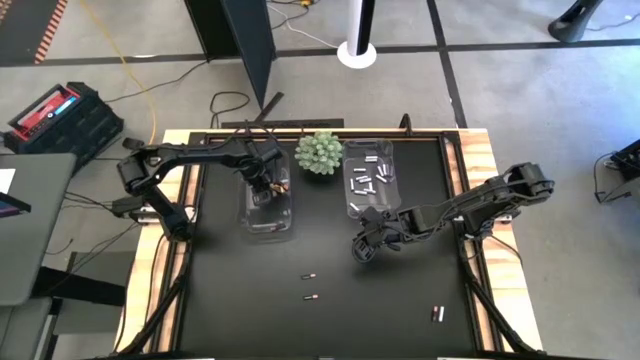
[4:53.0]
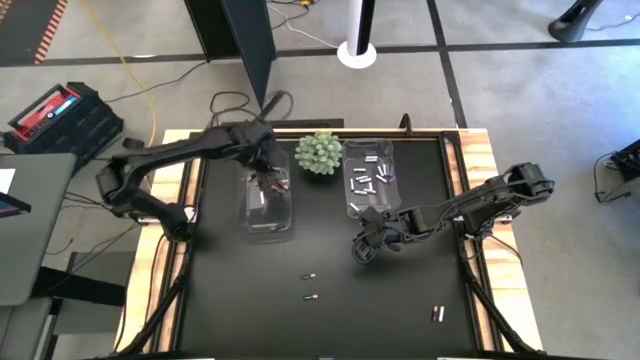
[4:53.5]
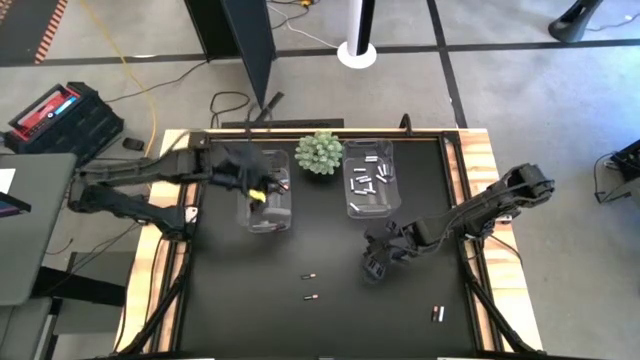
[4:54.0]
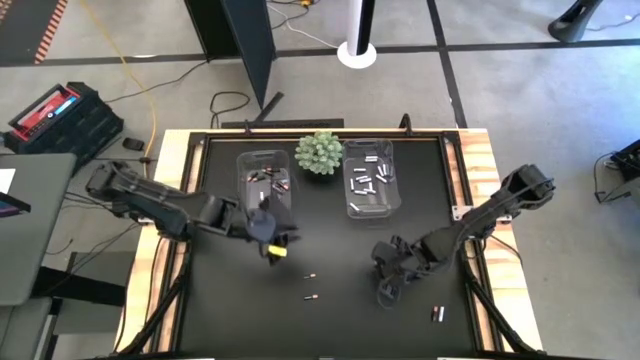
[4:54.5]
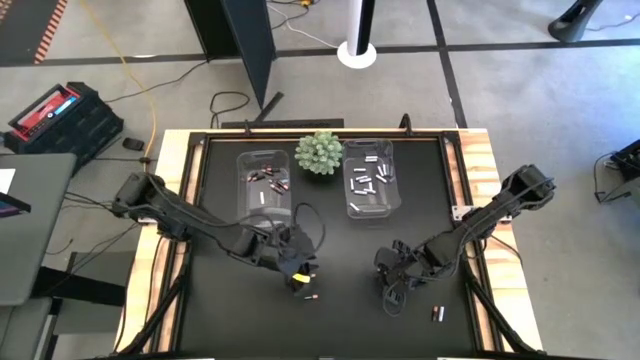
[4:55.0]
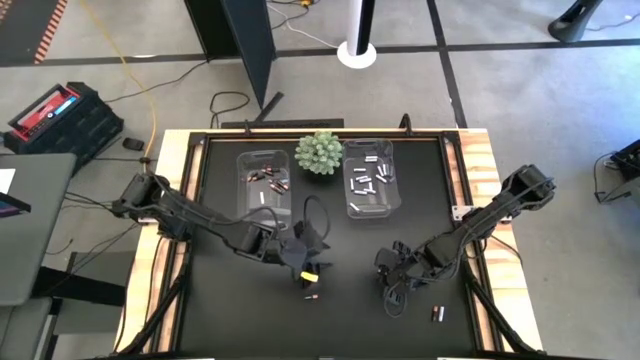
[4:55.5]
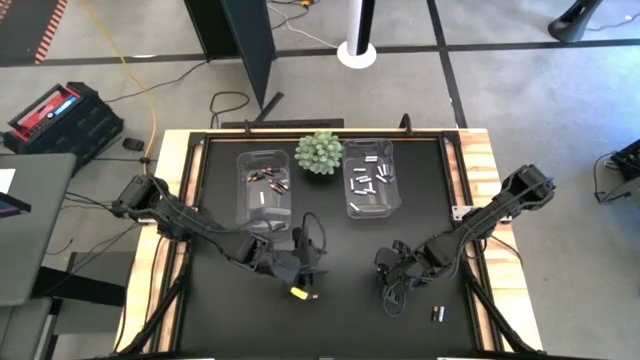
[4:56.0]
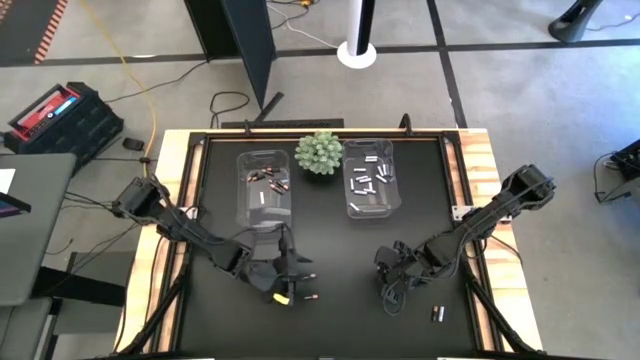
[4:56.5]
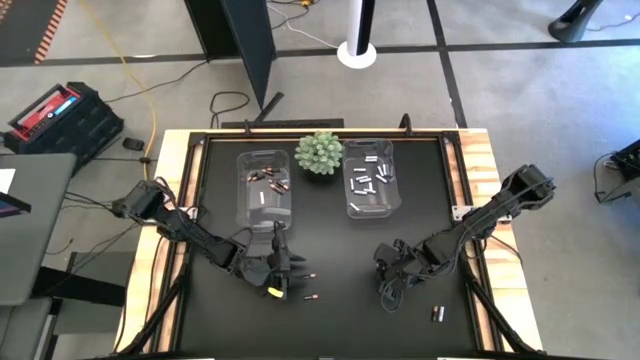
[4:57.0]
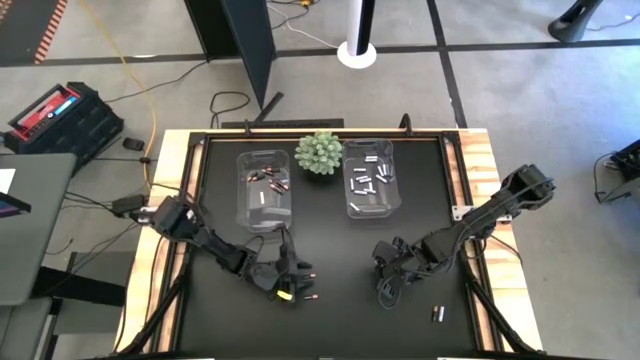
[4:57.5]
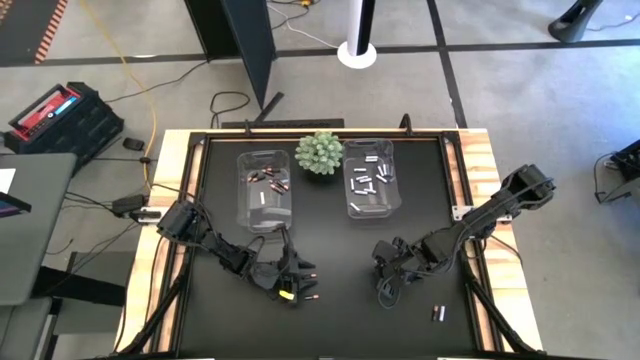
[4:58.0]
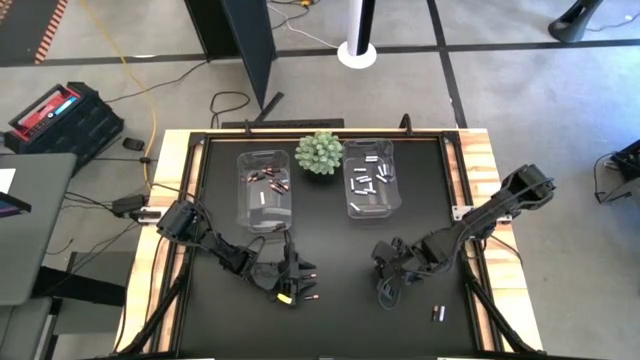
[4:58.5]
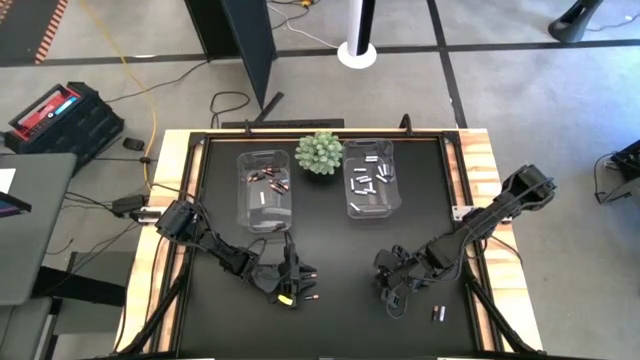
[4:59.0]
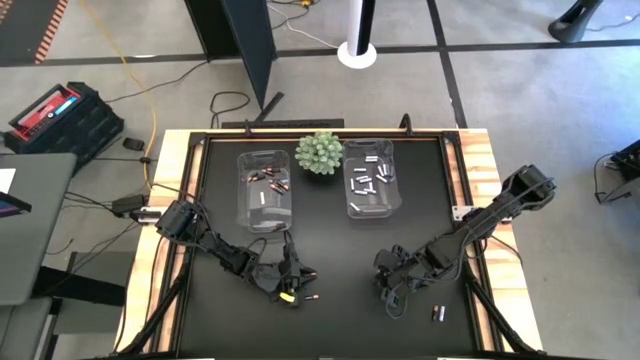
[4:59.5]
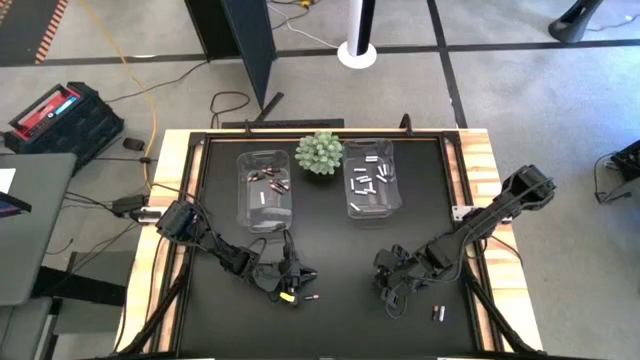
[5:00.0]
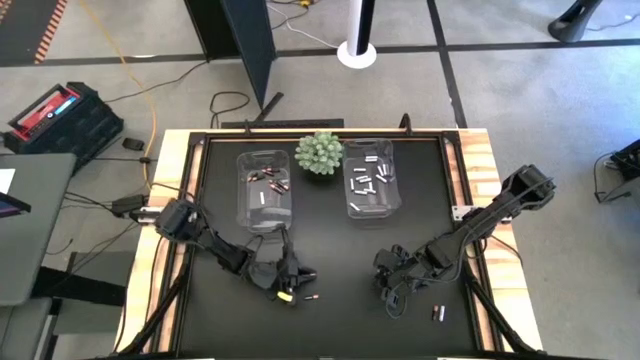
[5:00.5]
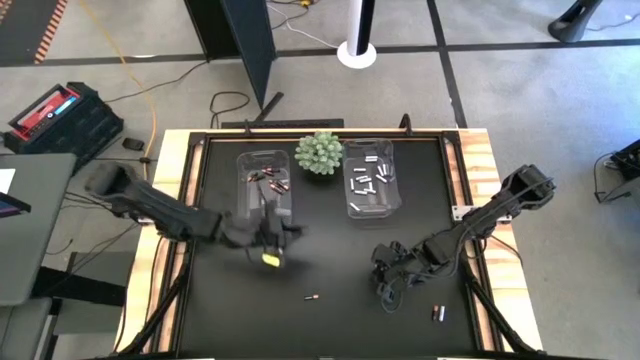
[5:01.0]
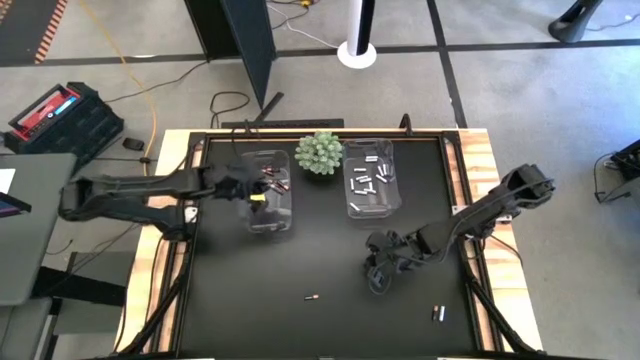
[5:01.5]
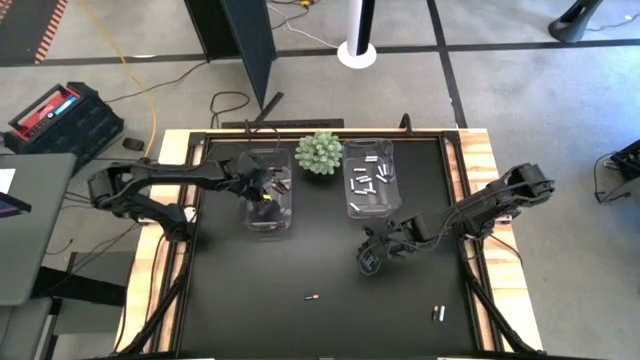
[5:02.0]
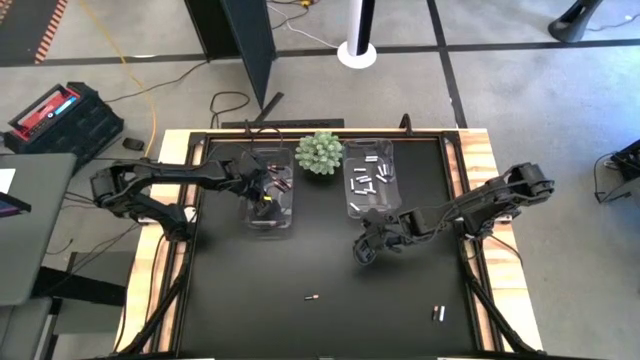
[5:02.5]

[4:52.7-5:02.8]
Task: Sort batteries
Put the black-brown battery into the left transparent bin

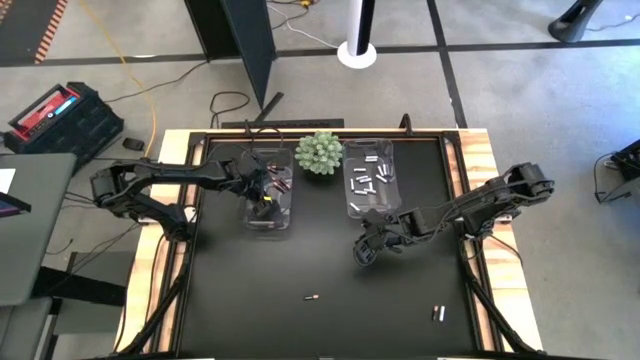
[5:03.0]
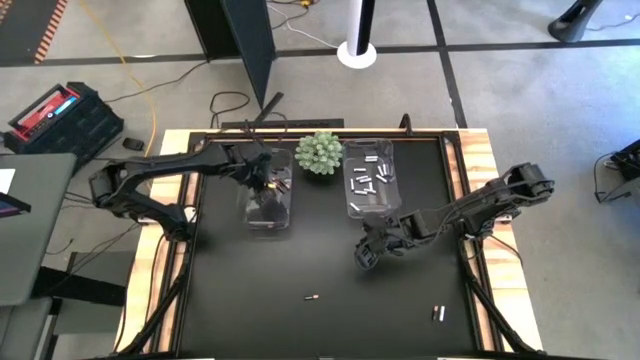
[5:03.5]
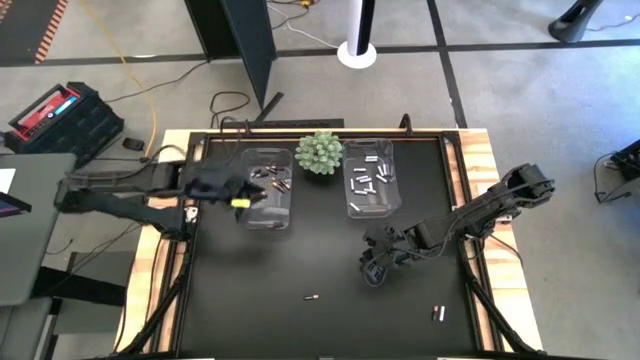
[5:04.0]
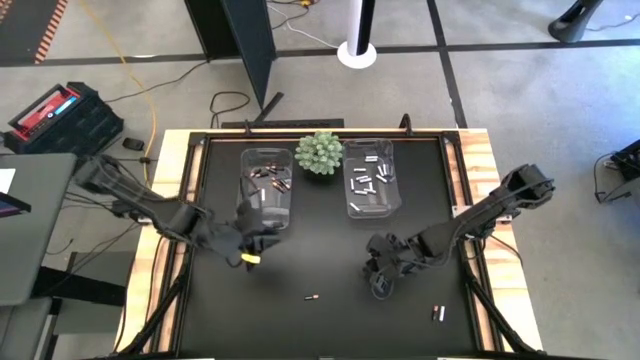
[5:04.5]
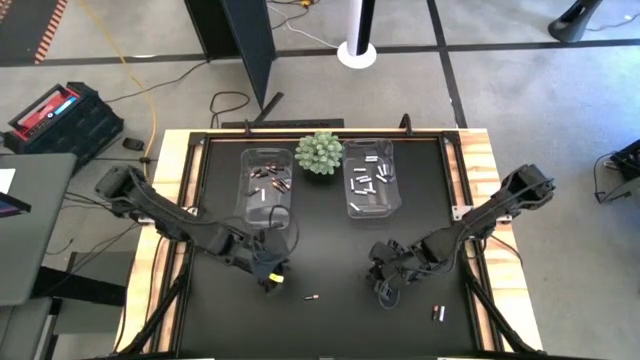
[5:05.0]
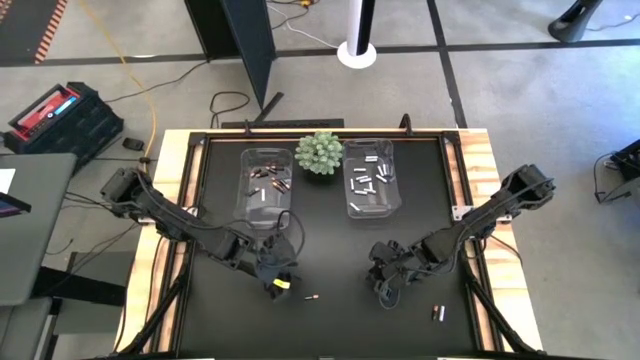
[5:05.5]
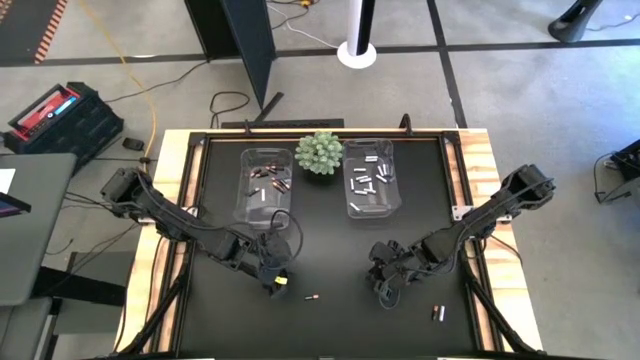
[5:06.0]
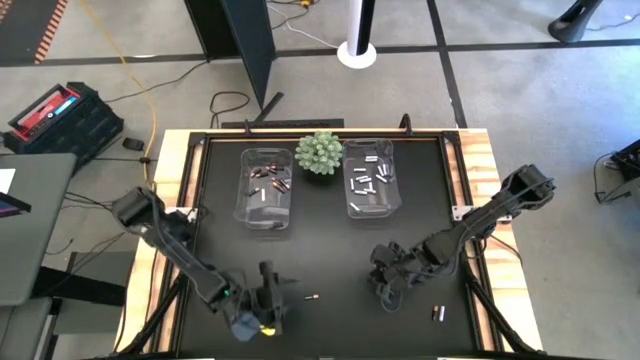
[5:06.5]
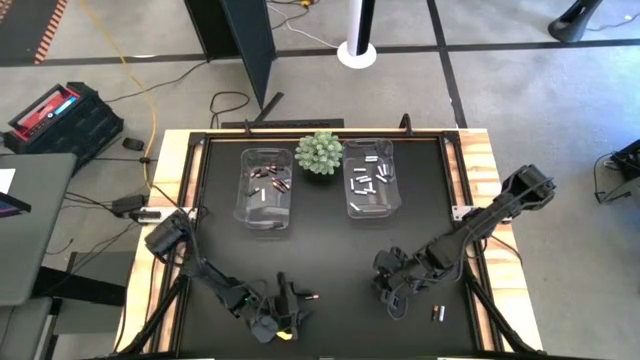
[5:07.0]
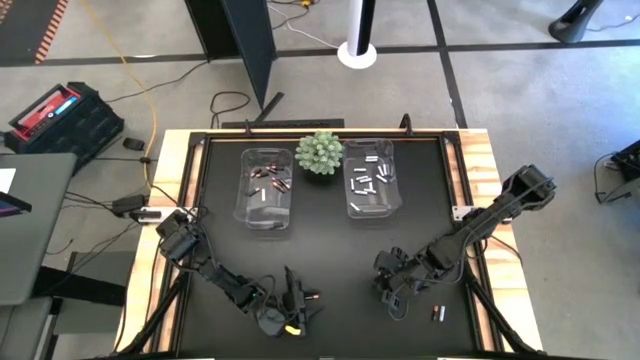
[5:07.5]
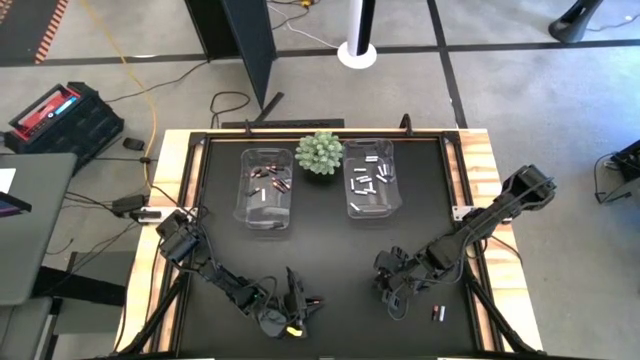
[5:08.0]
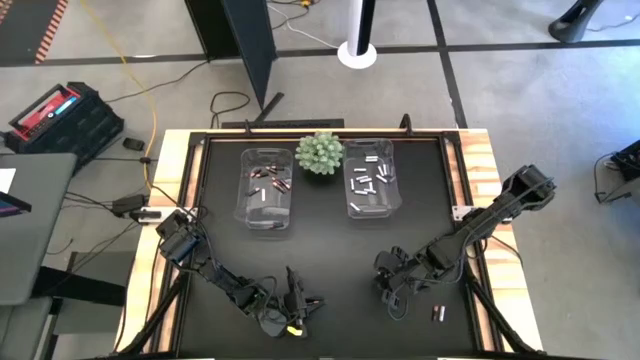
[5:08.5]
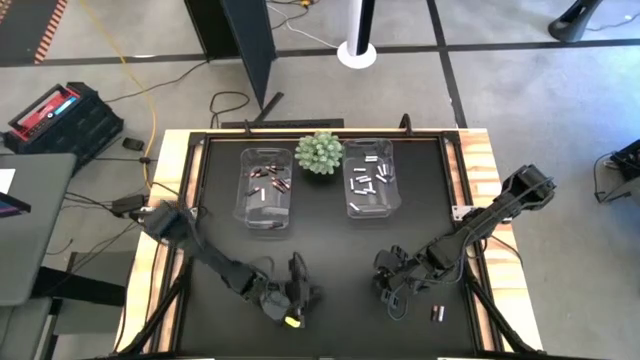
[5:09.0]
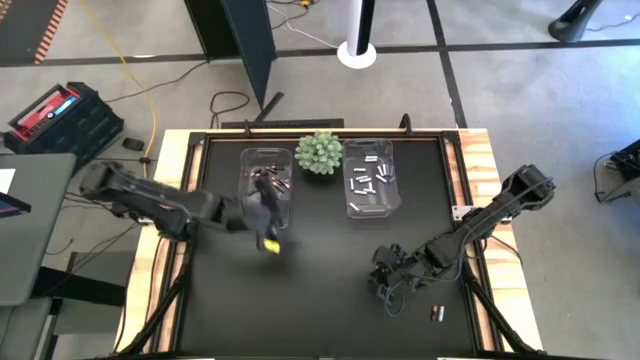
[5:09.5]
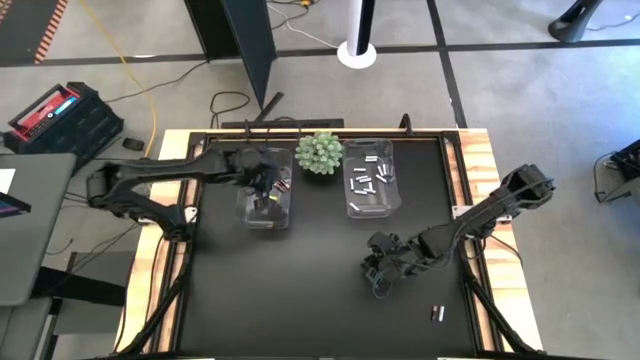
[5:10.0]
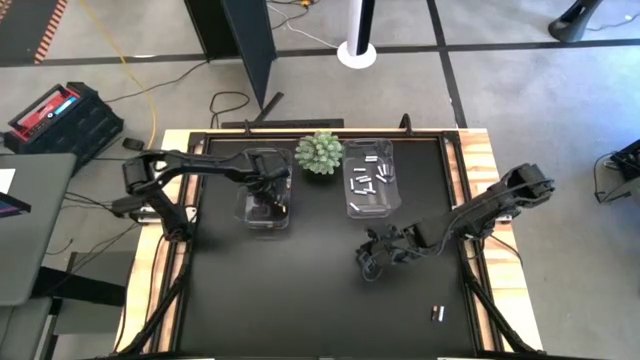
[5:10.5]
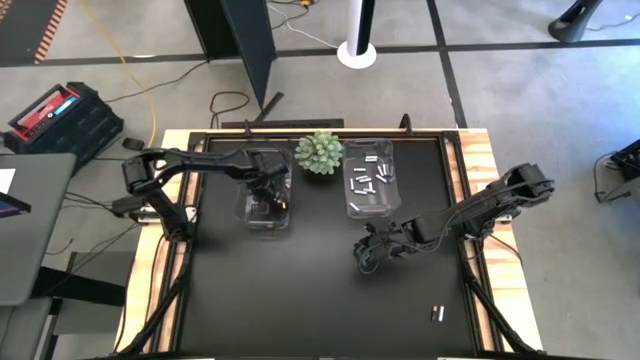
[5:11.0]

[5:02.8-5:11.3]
Put the black-brown battery into the left transparent bin

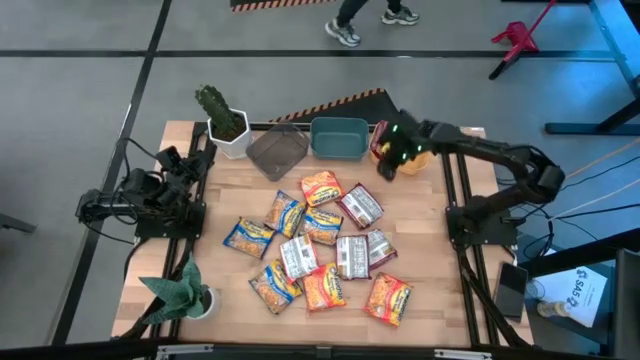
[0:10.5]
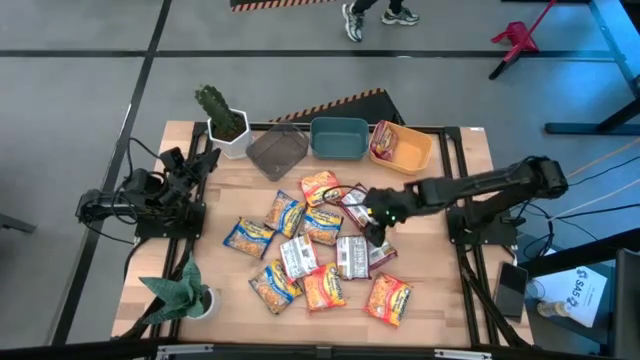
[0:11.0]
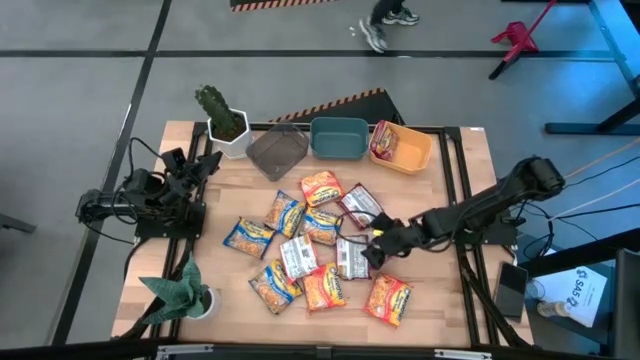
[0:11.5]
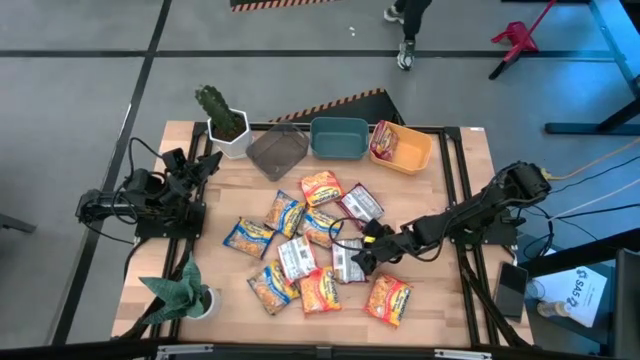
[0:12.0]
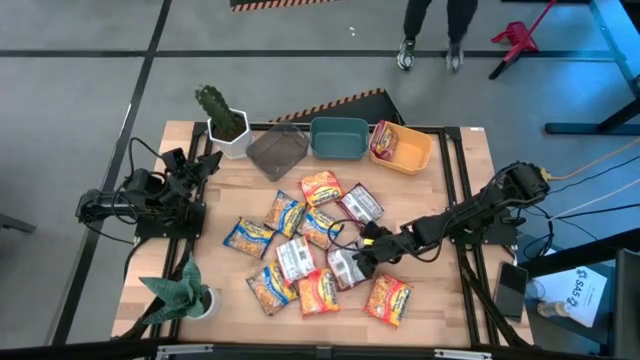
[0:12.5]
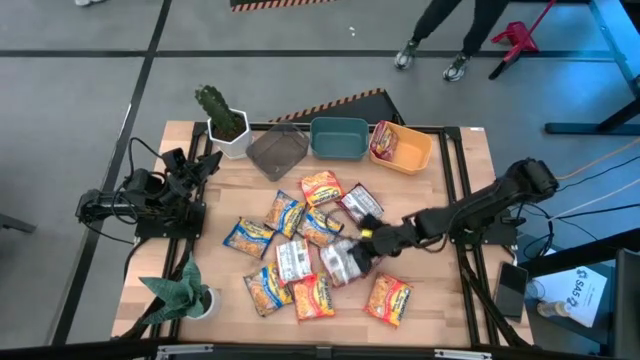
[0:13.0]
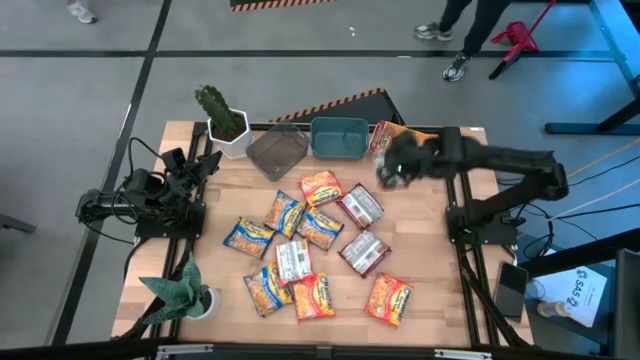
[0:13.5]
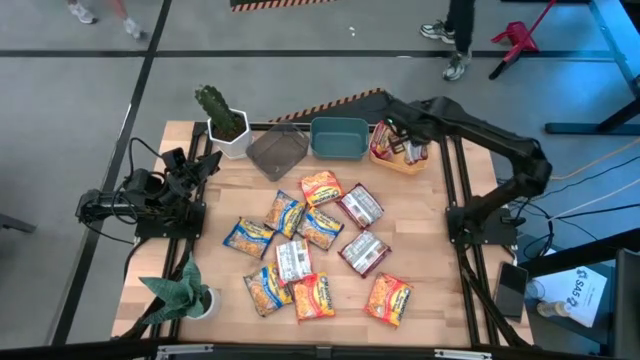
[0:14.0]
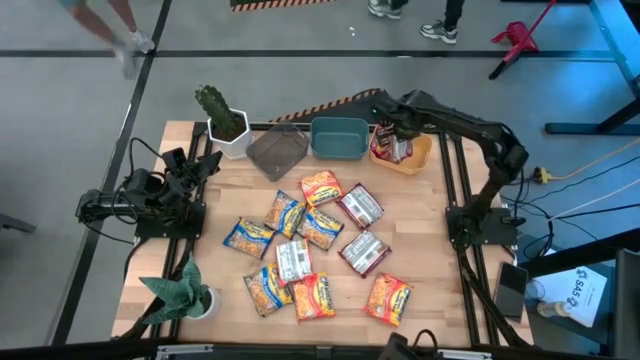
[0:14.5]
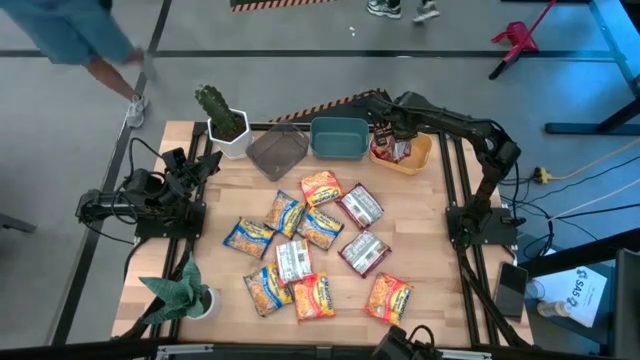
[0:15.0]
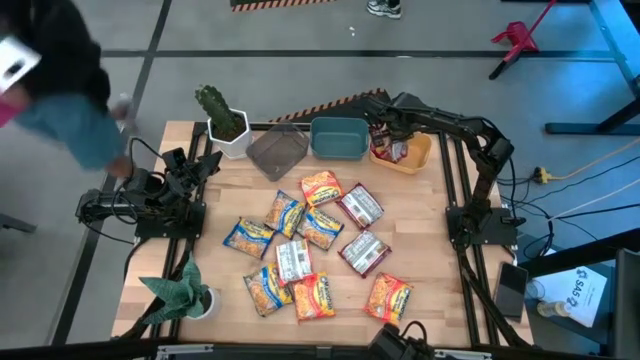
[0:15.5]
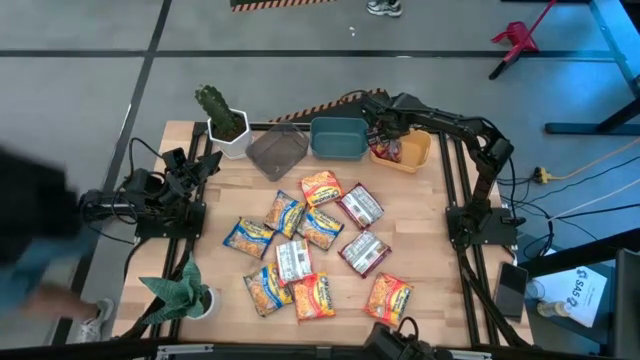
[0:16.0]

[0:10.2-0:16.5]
Task: Sort Maruchan noodles
Put the left red noodle pack into the orange bin
